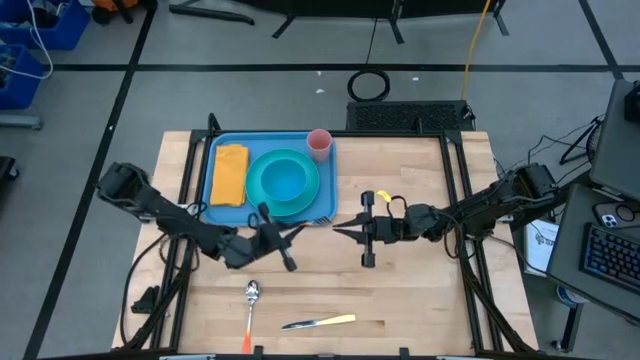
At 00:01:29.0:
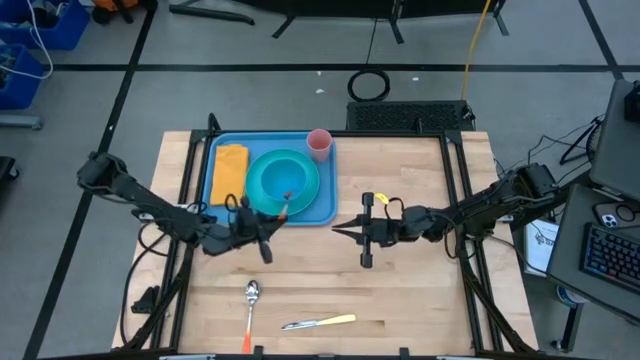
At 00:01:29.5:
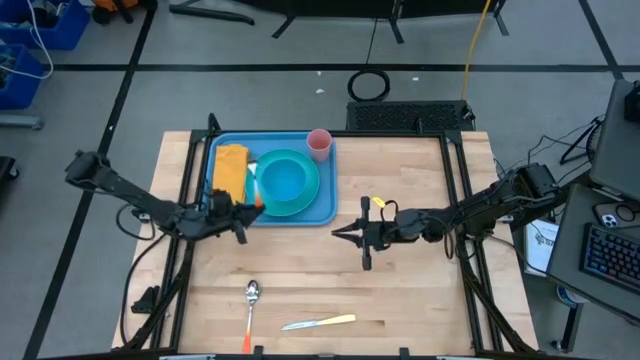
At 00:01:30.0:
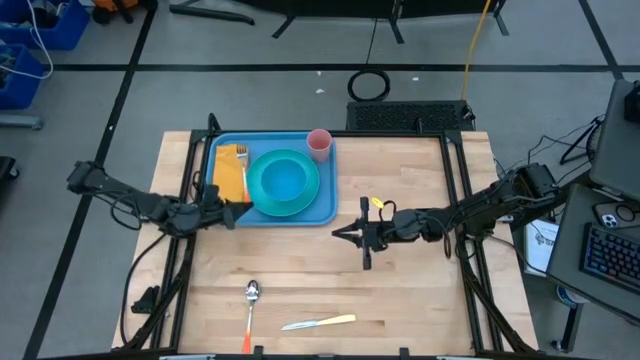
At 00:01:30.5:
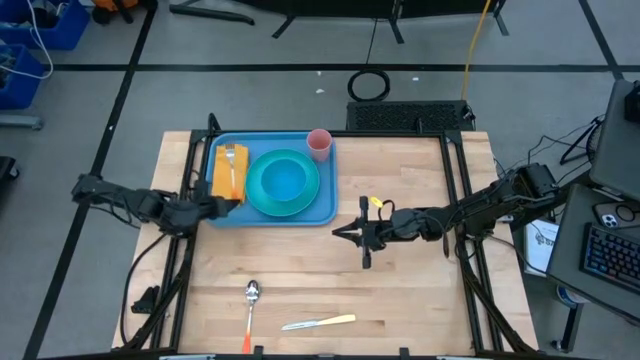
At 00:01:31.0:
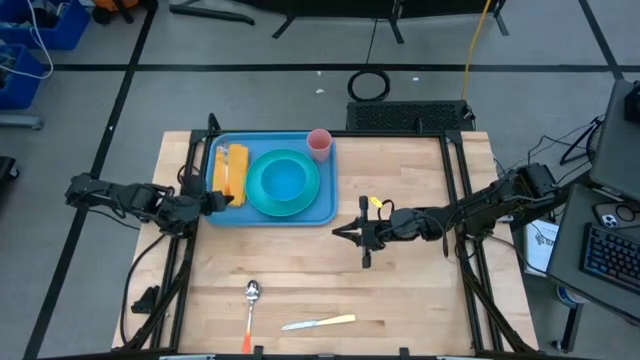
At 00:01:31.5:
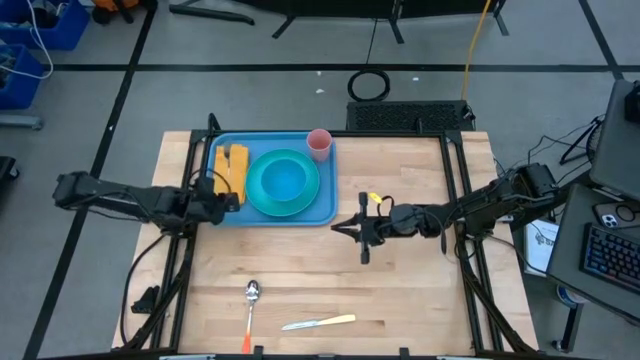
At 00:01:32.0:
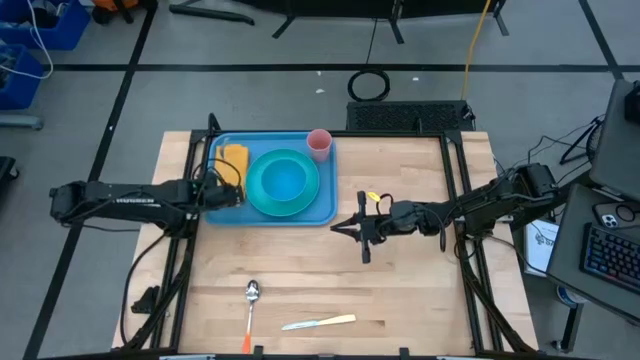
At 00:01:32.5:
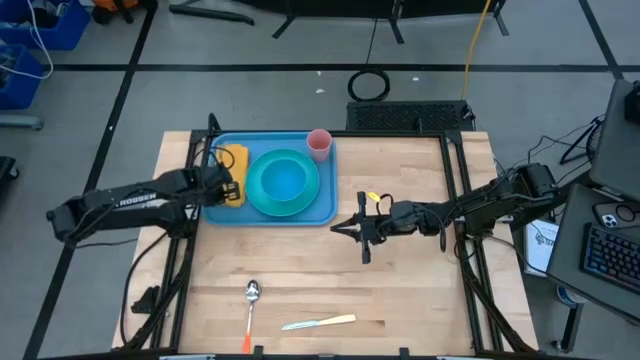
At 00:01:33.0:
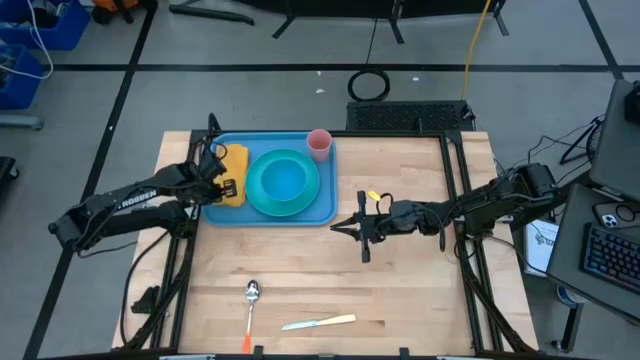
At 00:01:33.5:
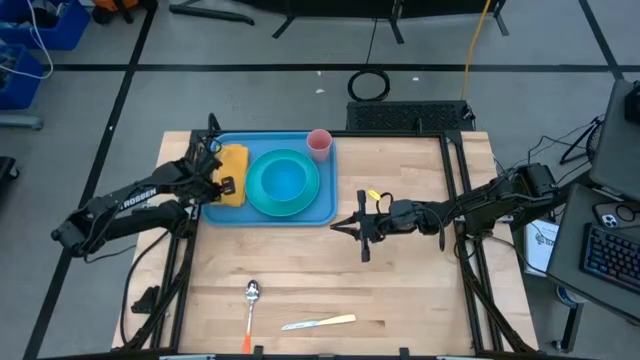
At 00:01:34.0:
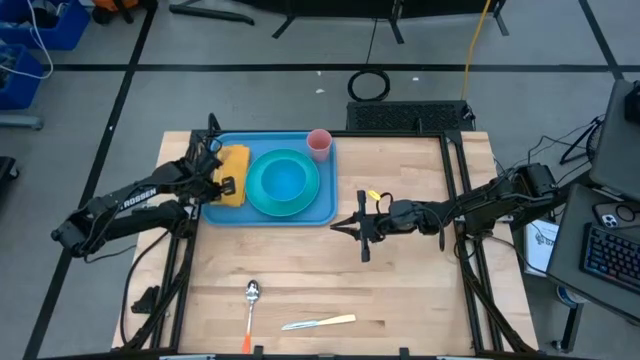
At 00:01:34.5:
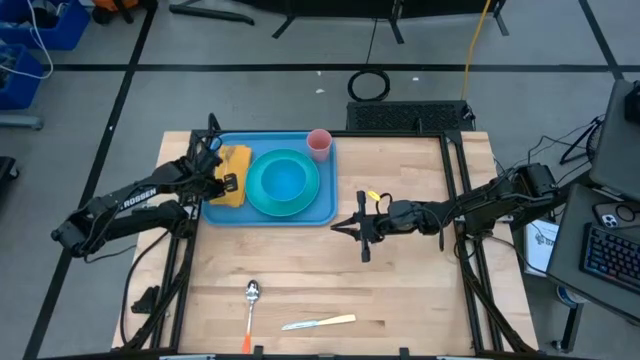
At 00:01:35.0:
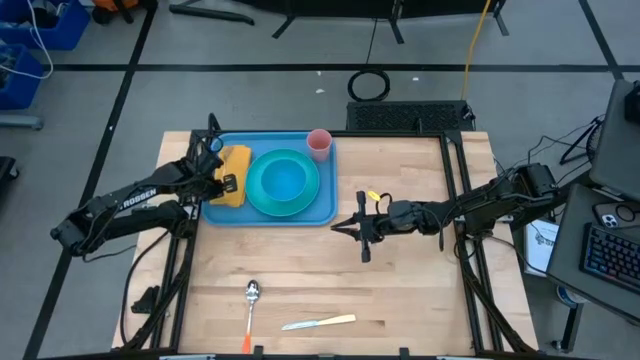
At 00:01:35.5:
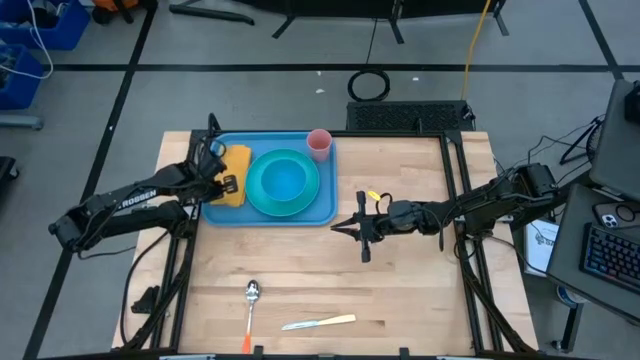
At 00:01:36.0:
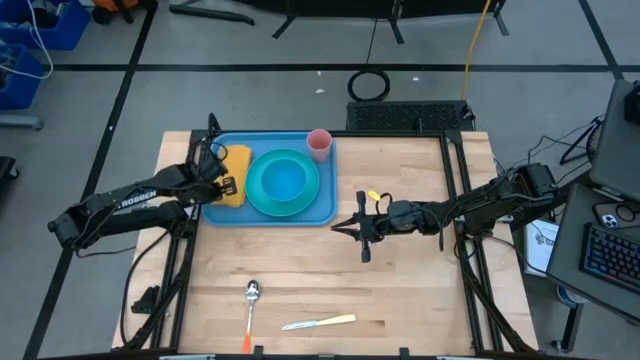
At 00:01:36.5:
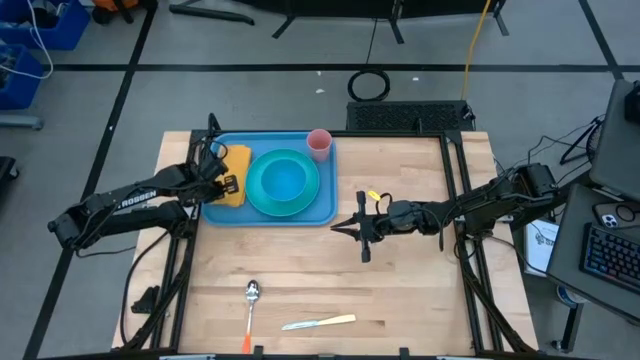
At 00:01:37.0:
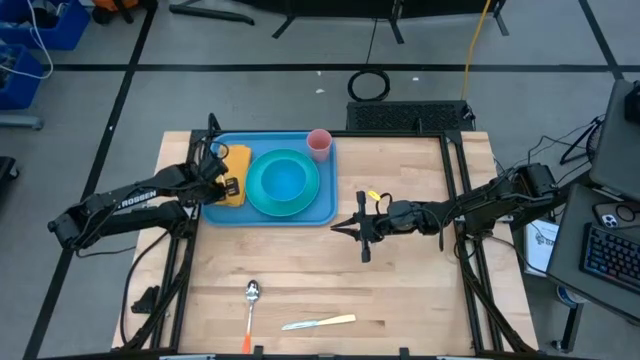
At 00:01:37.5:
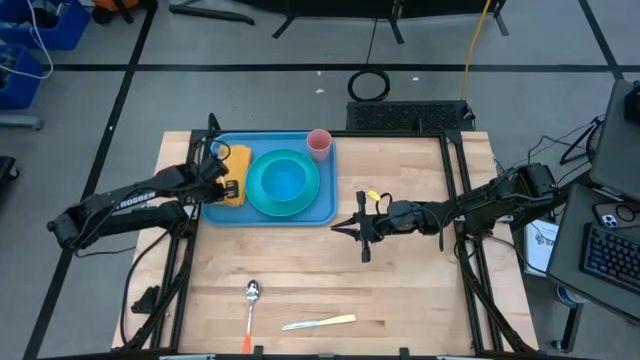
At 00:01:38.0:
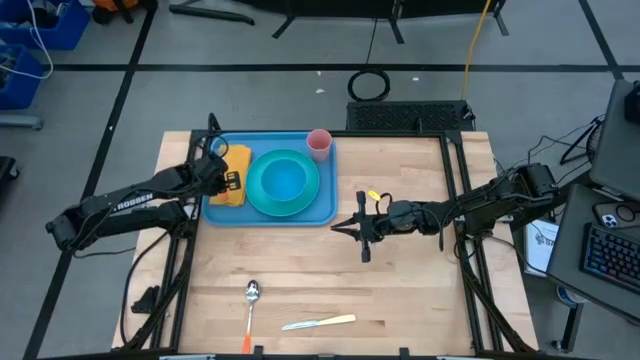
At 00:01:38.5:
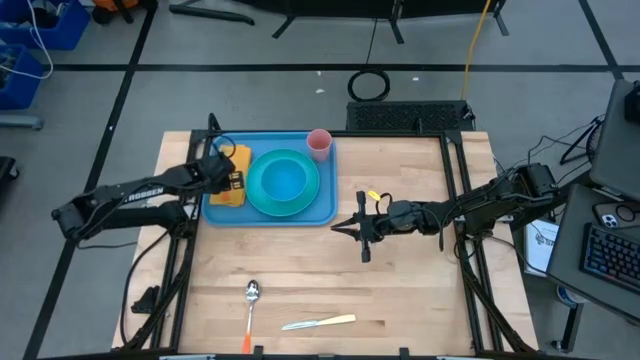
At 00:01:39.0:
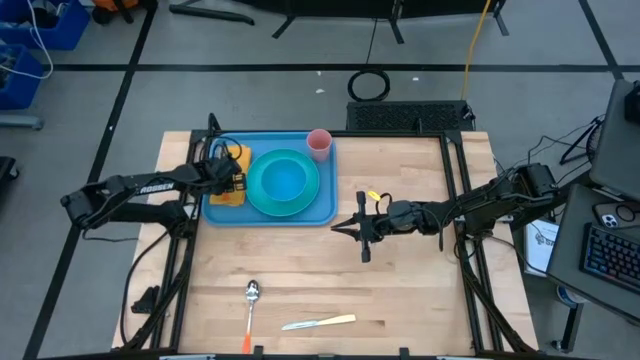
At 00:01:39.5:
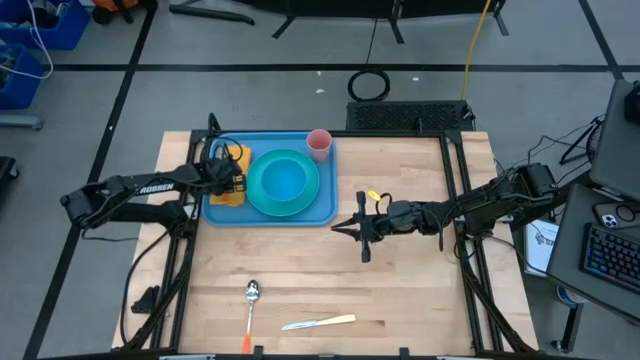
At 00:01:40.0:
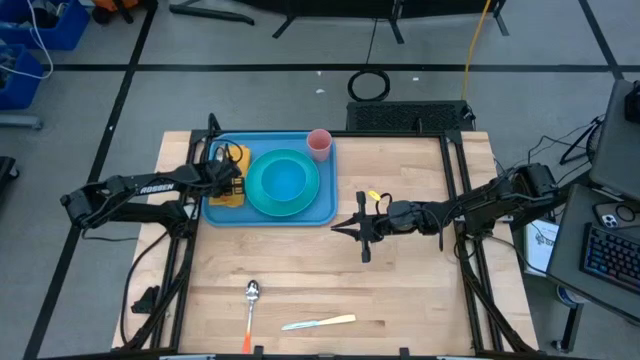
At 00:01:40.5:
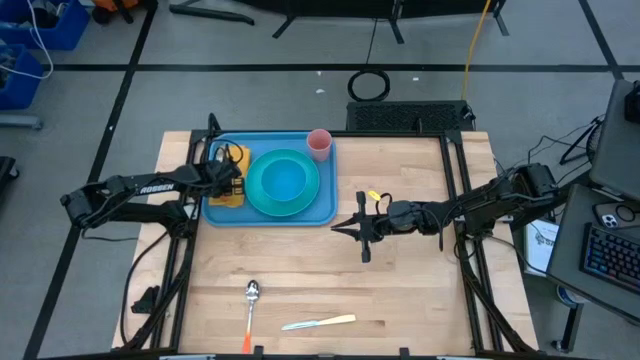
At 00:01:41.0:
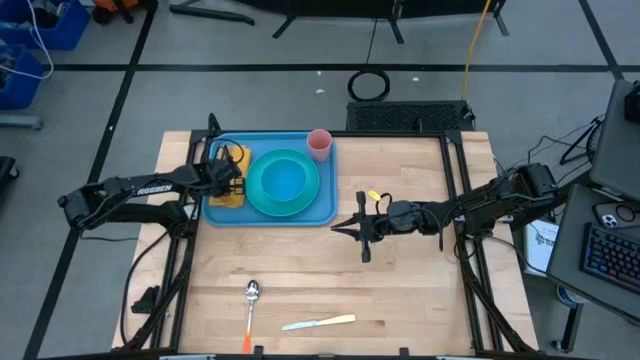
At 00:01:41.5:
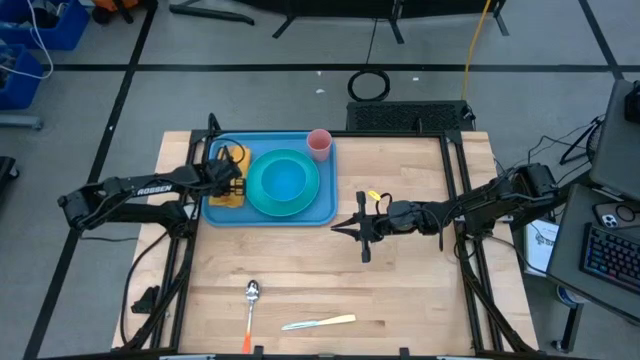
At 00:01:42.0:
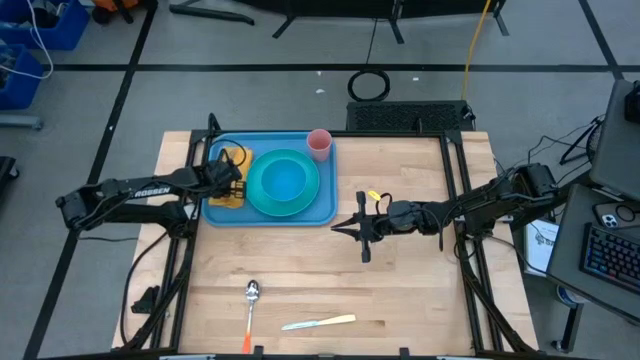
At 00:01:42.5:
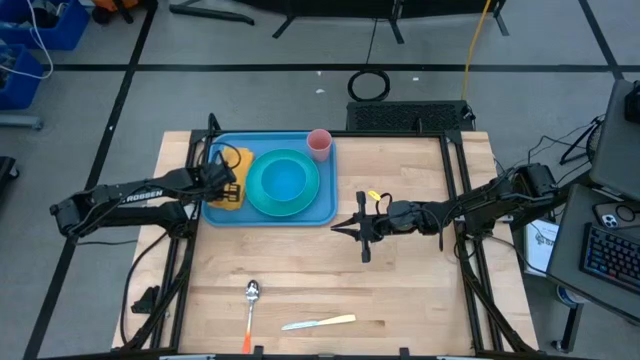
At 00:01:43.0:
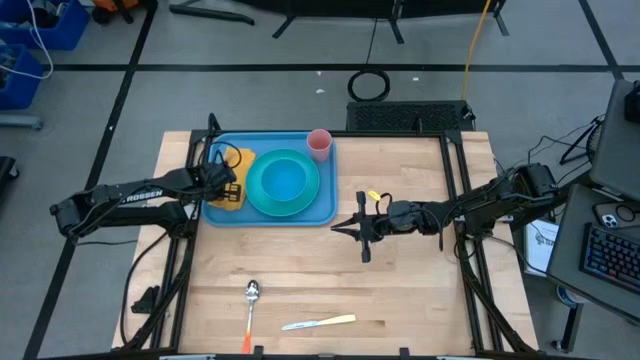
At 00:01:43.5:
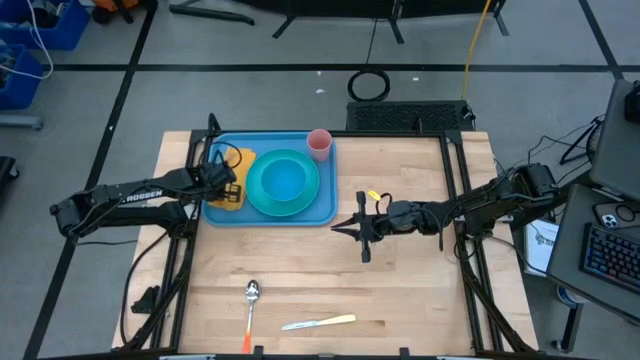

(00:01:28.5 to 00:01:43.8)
Task: Set up tray
Put the orange fork on the yellow napkin on the blue serving tray

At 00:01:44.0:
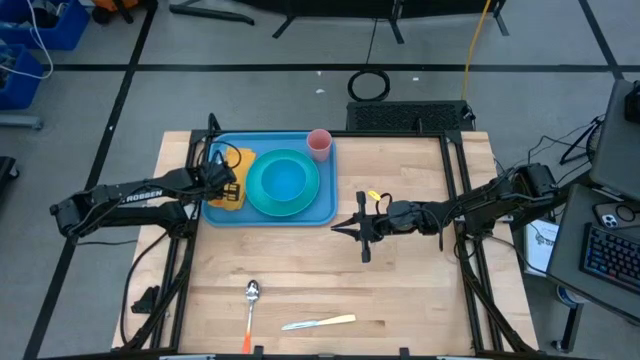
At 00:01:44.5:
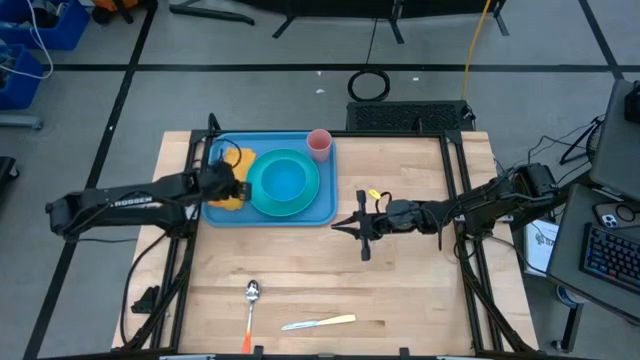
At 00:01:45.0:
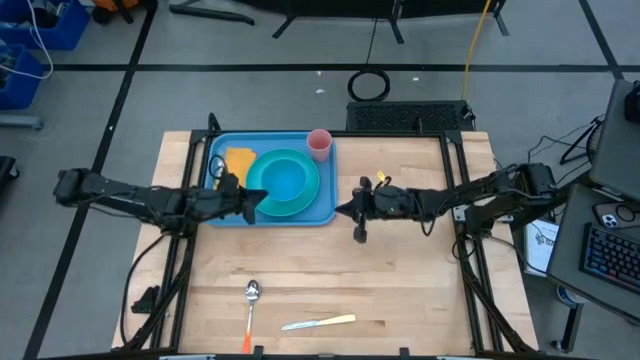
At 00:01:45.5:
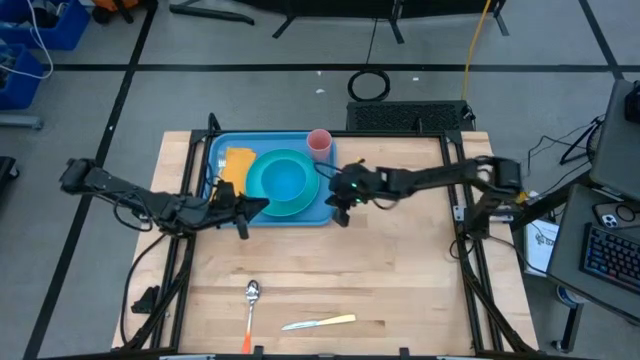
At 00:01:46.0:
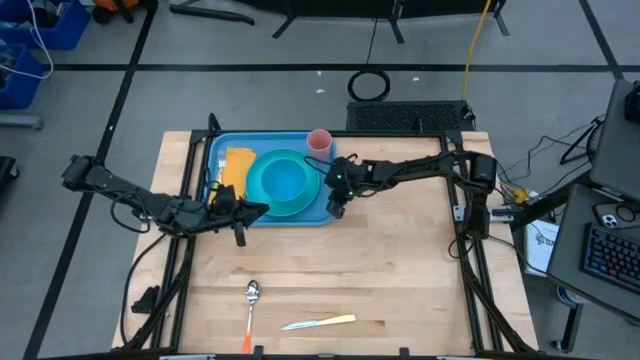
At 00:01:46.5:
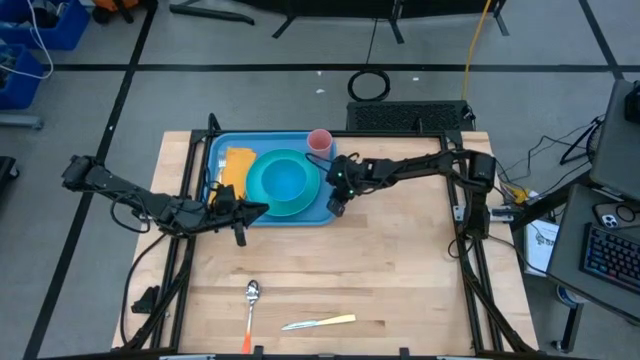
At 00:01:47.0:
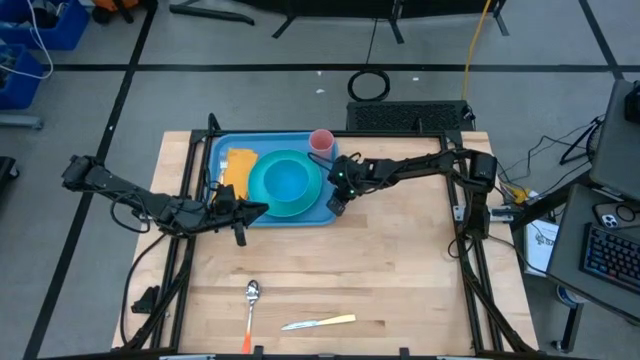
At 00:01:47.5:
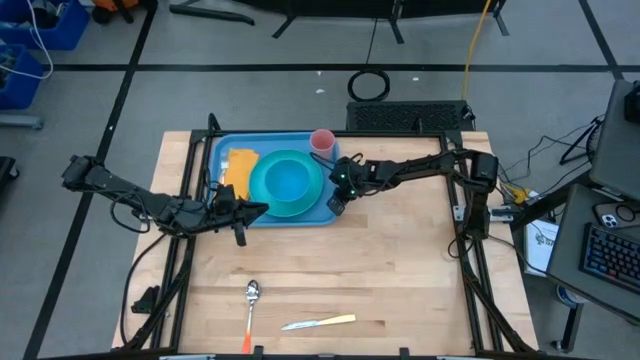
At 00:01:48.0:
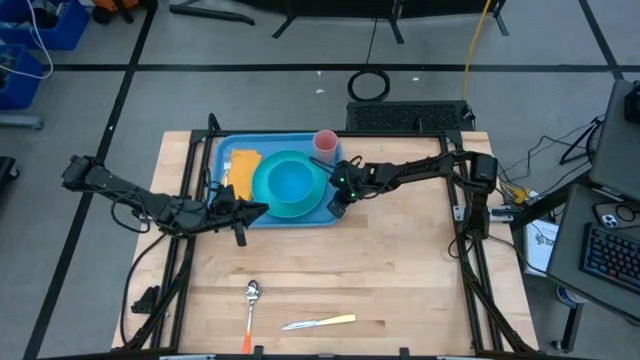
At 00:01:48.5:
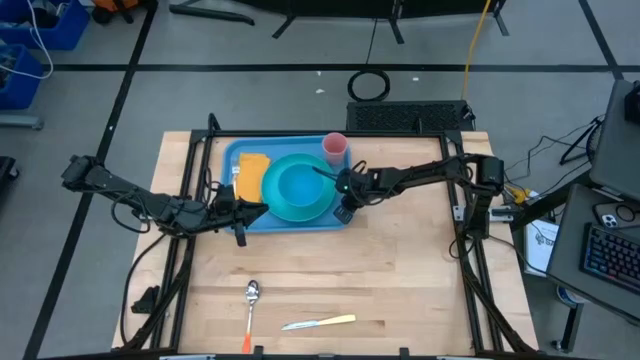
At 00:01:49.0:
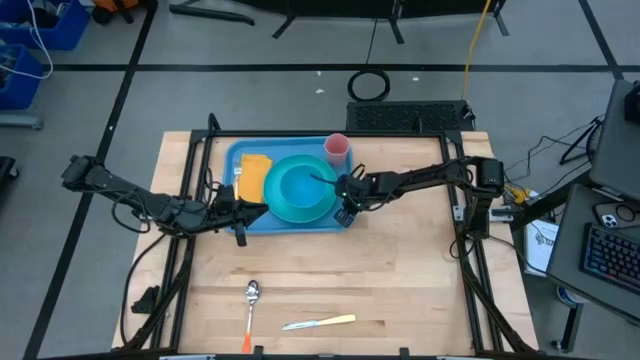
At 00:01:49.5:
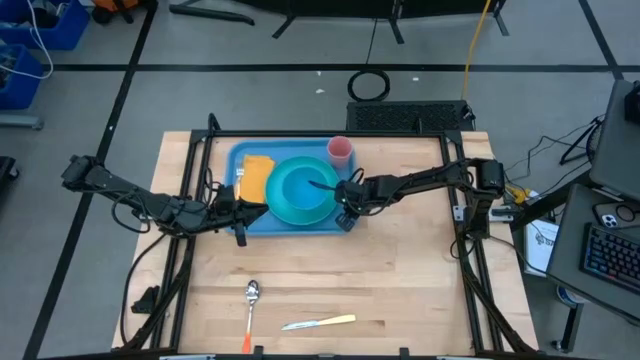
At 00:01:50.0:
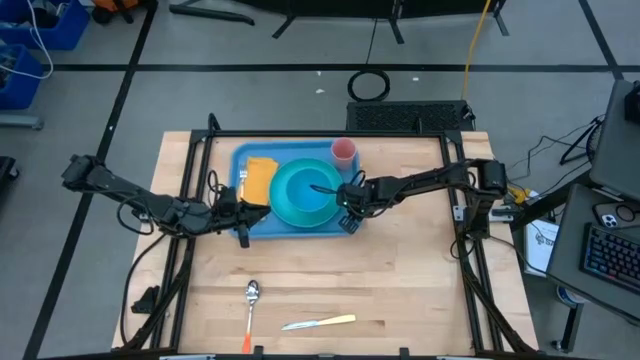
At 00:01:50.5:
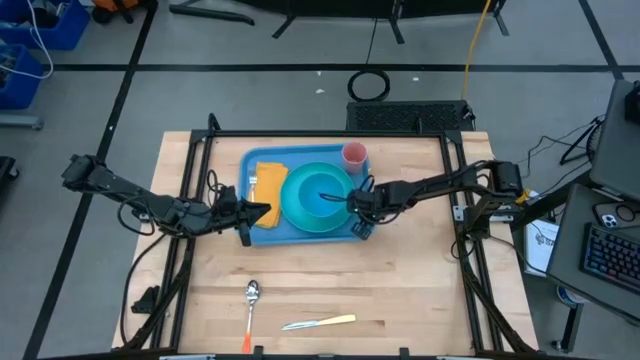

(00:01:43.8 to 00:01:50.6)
Adjust the blue serving tray
